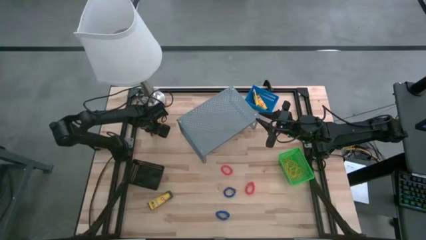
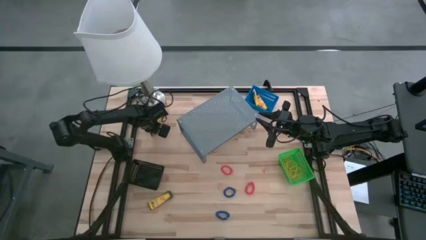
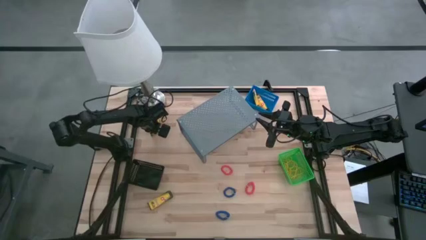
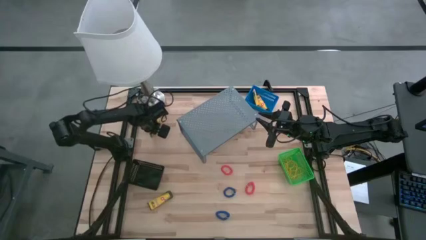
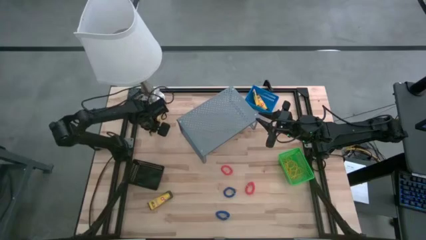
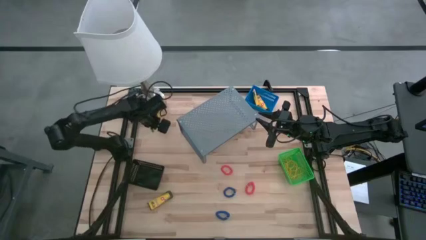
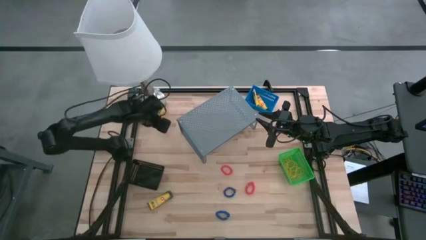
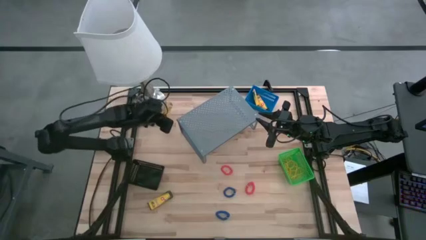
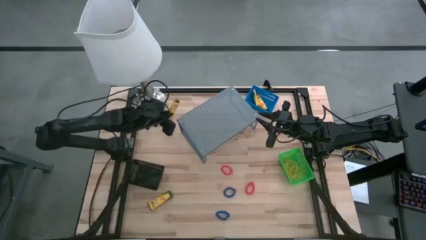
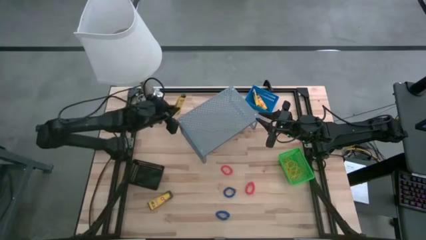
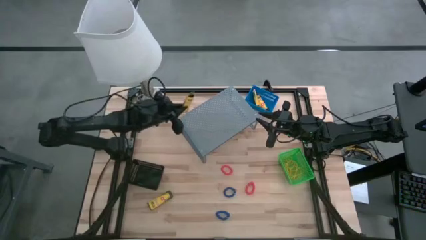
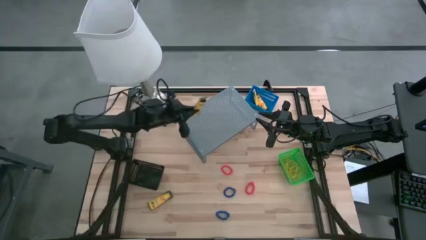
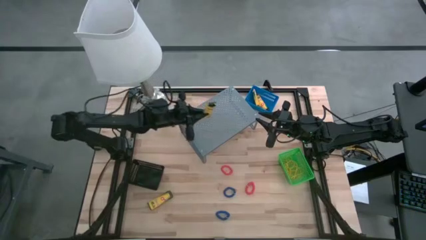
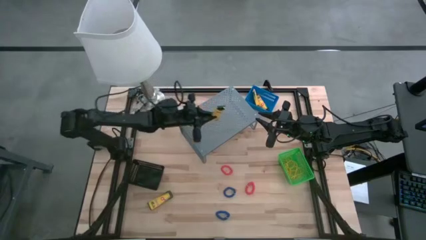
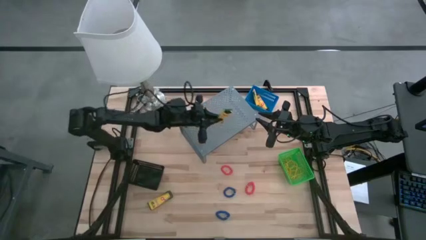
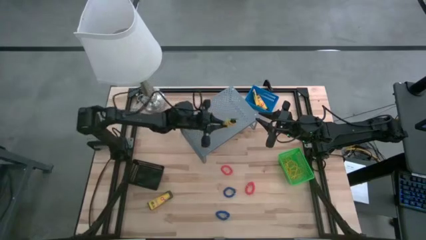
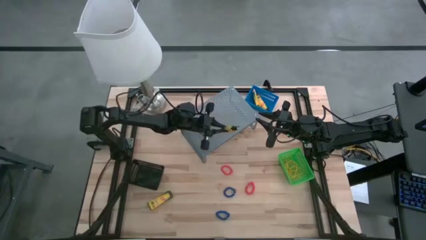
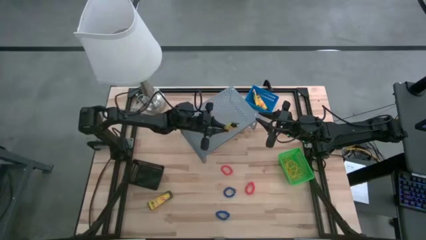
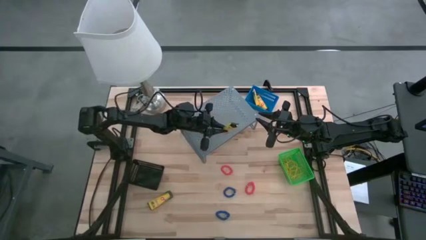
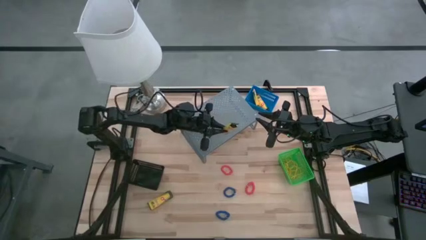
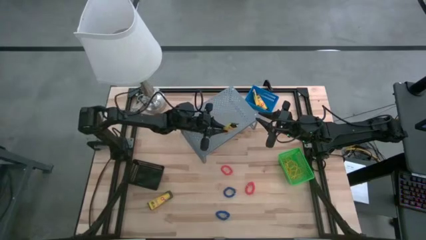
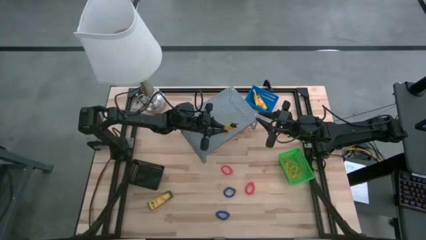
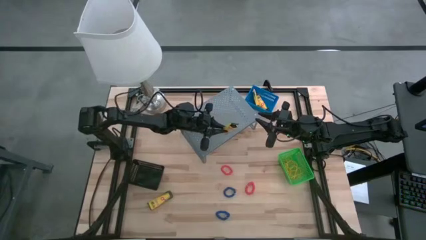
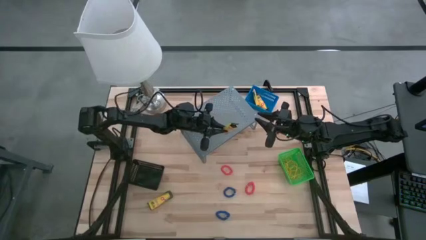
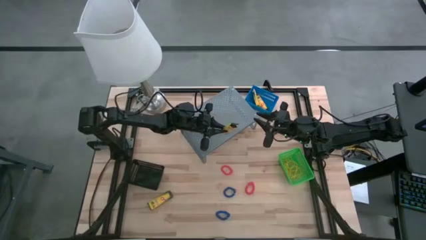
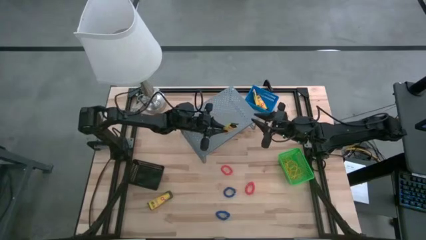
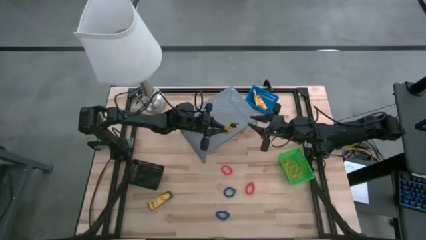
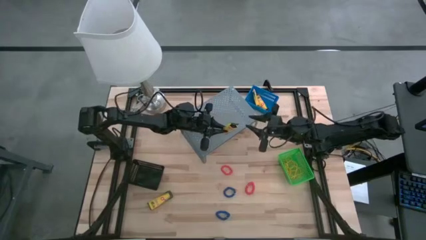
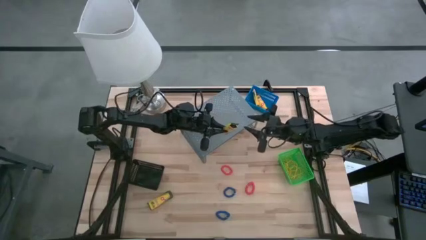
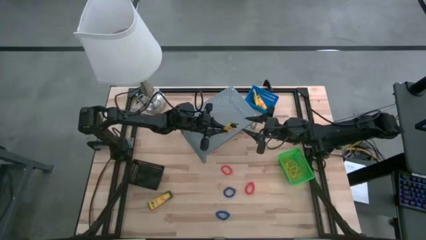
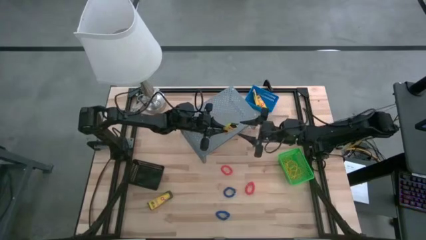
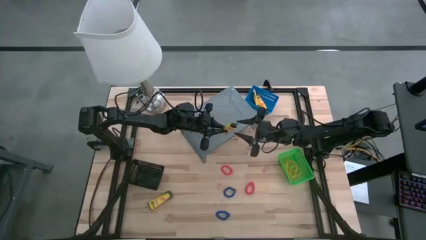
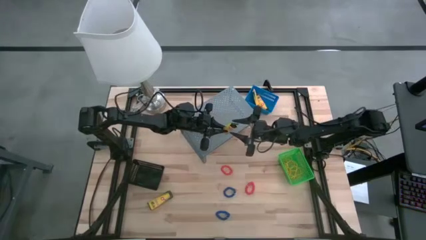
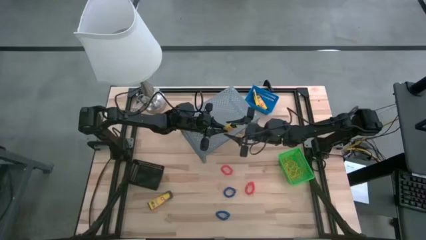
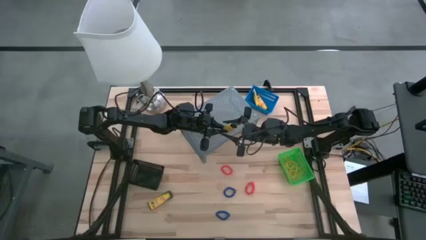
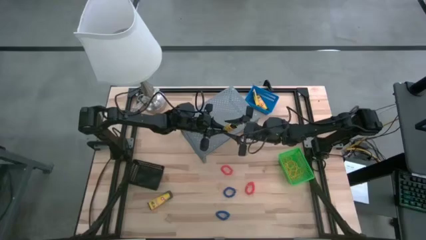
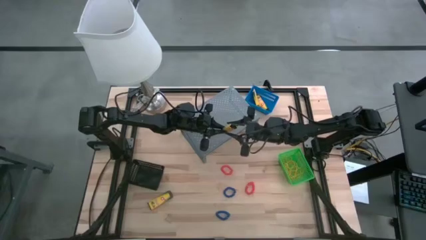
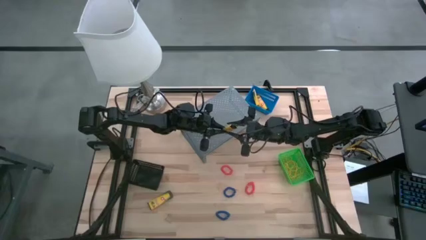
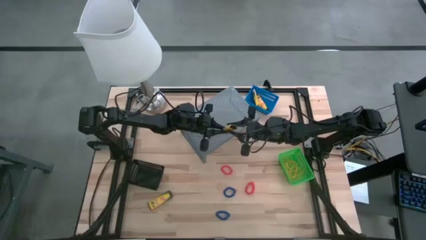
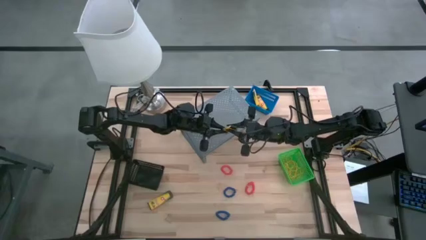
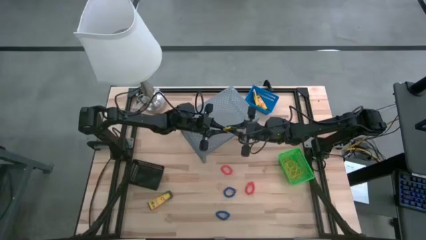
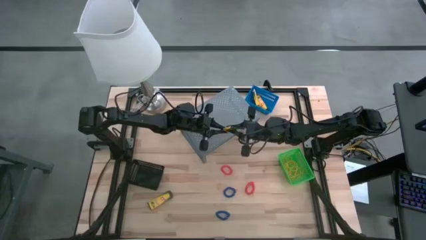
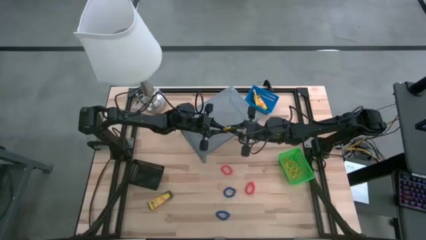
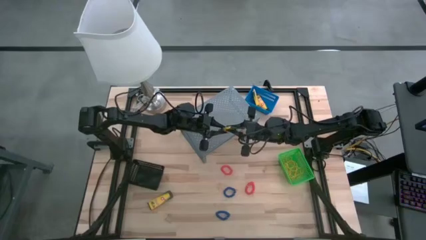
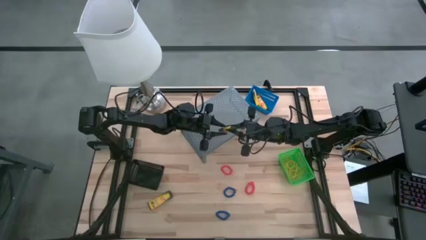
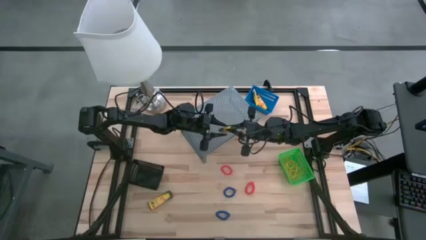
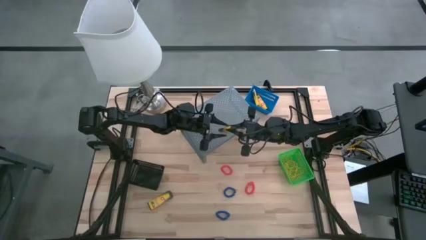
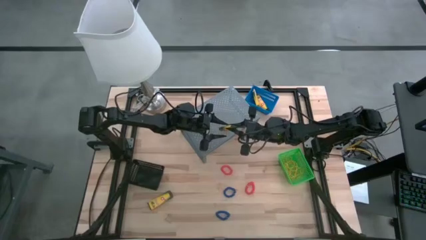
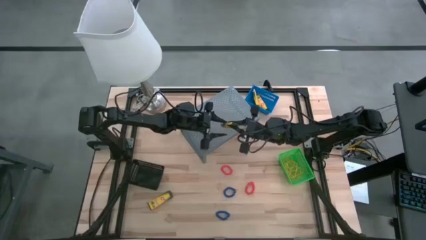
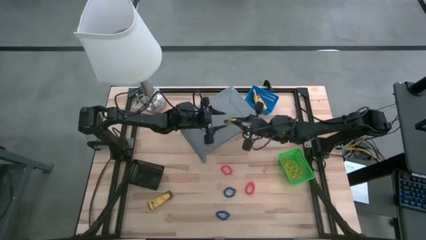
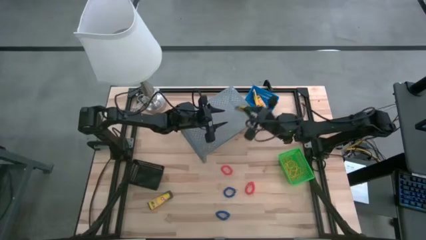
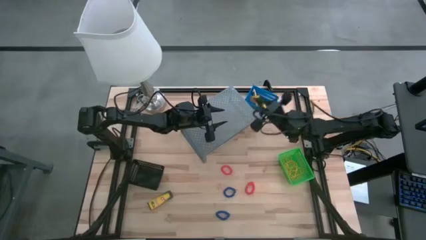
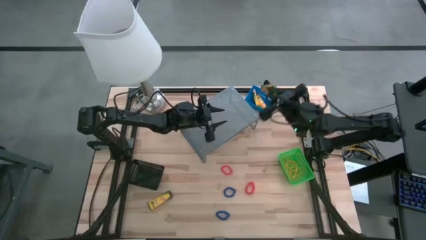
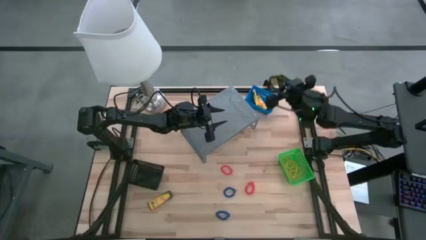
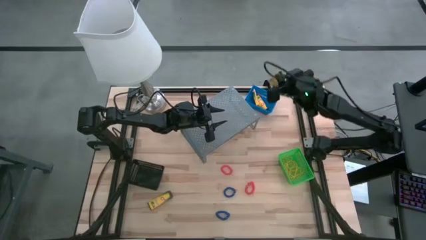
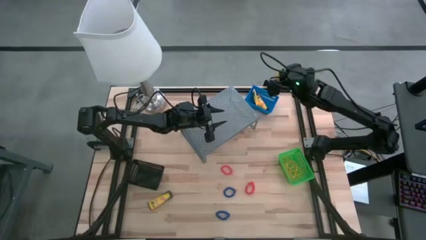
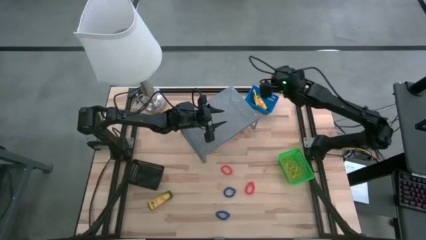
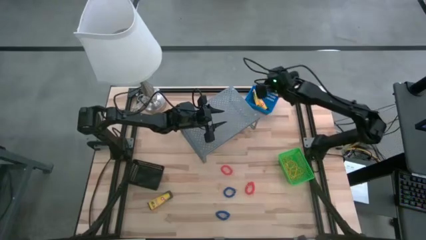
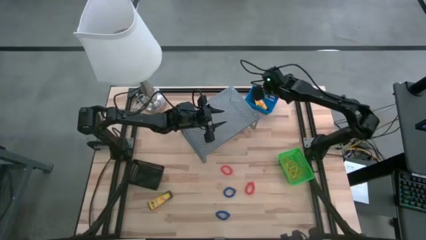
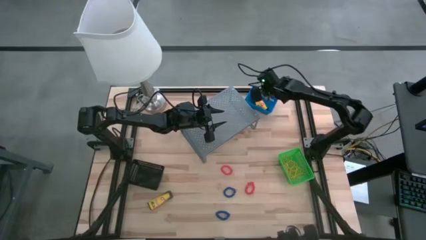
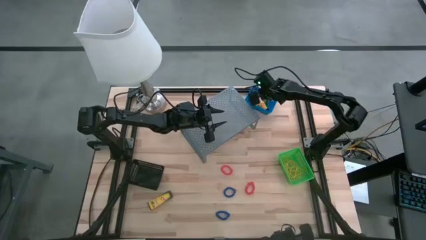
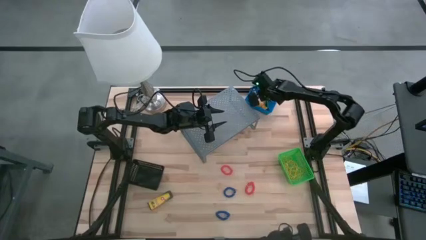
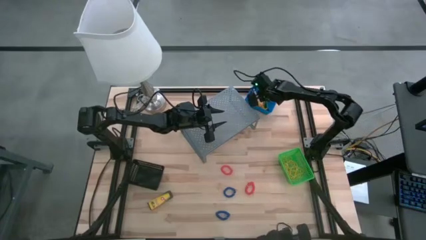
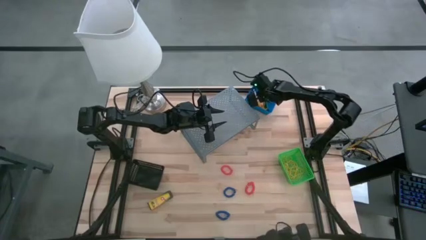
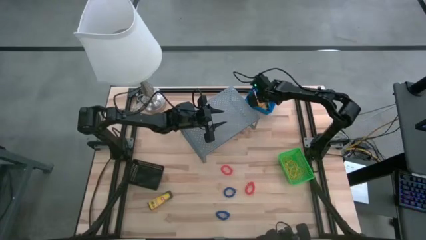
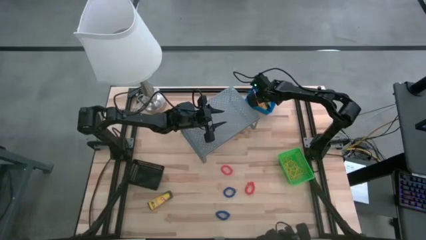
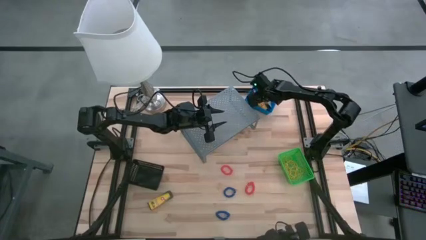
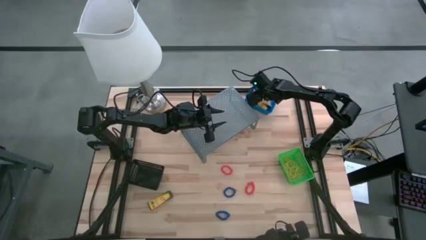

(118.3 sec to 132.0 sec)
Task: Pick & Place Office Desk Supplies
Put the crayon box into the blue basket
